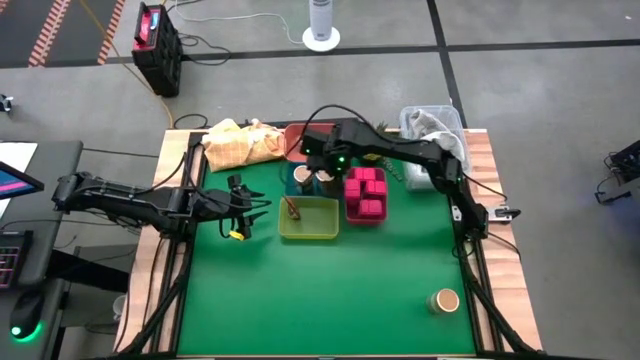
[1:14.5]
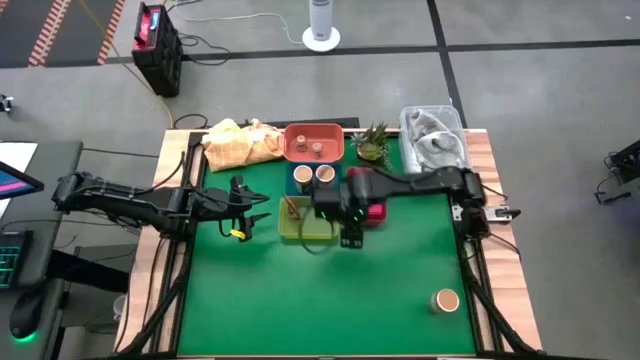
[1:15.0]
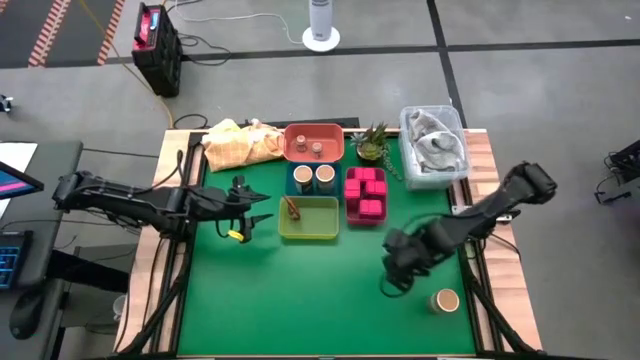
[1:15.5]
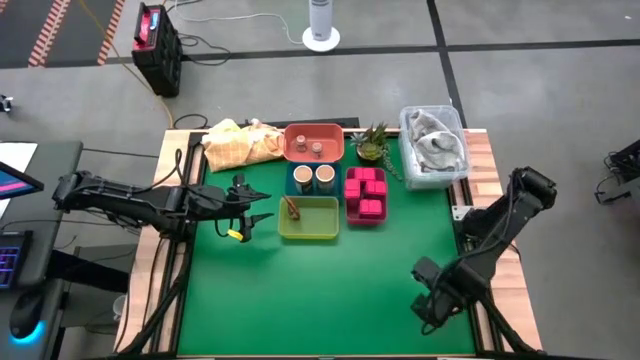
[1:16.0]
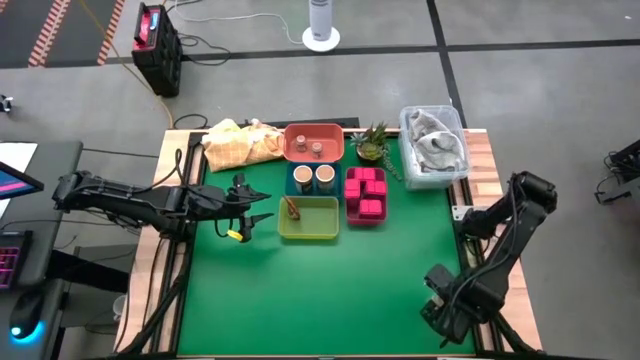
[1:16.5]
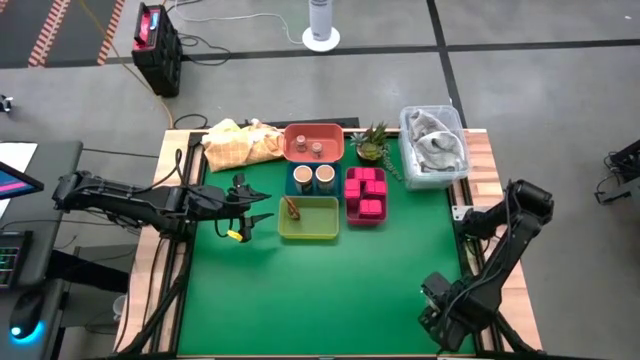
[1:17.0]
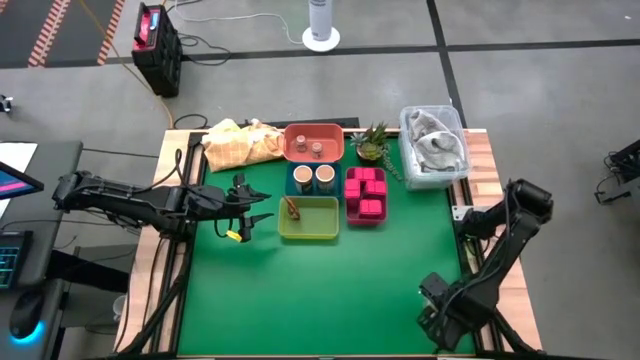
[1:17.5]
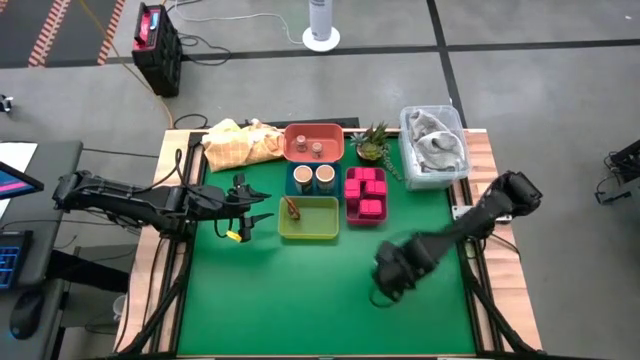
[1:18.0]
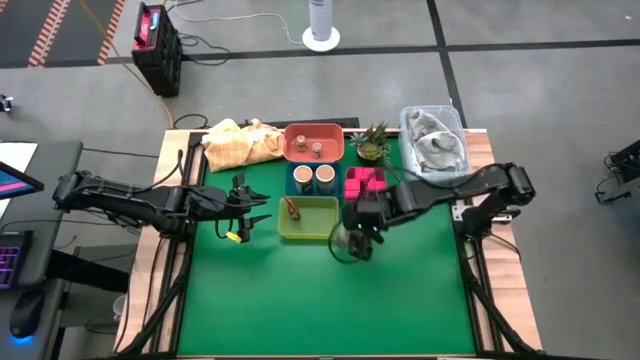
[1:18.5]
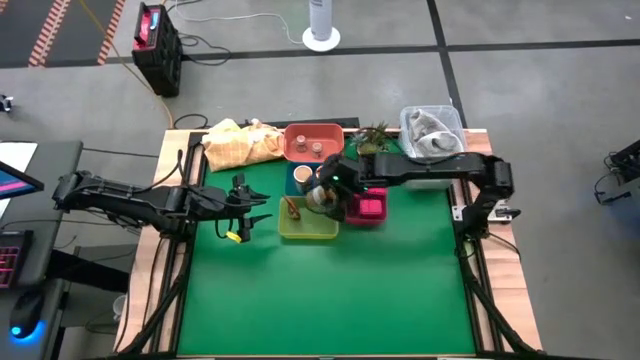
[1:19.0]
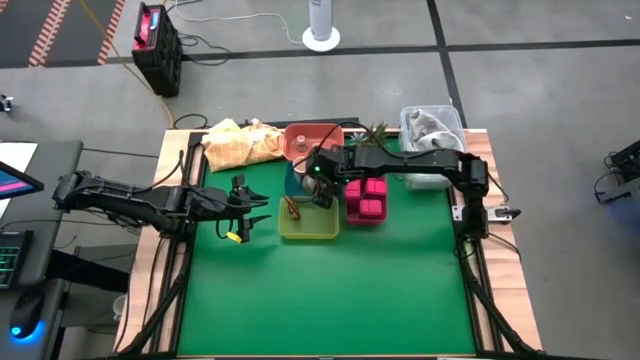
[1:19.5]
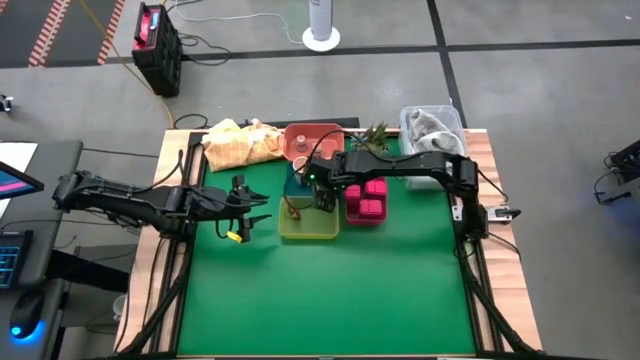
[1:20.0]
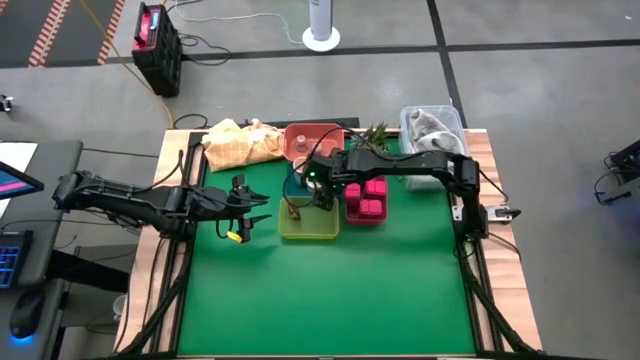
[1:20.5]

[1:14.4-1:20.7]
Task: Sort spices by type
Put the gold seasoning bottle into blue bin

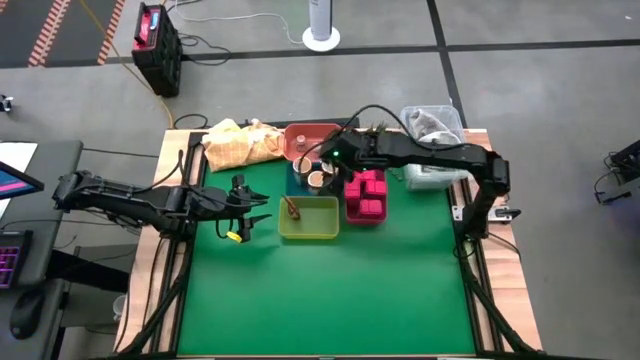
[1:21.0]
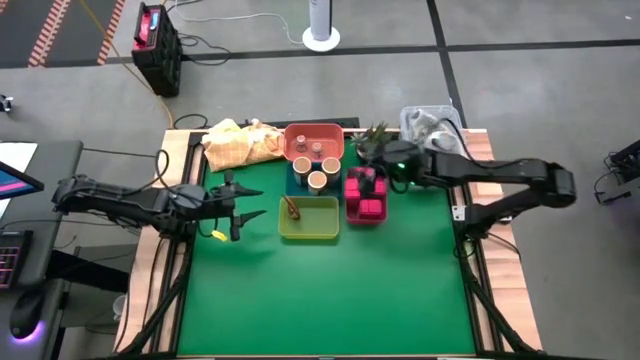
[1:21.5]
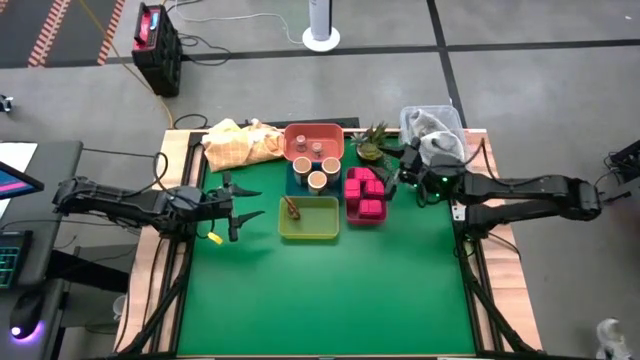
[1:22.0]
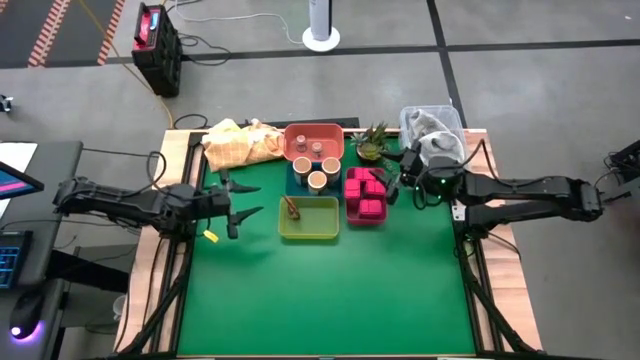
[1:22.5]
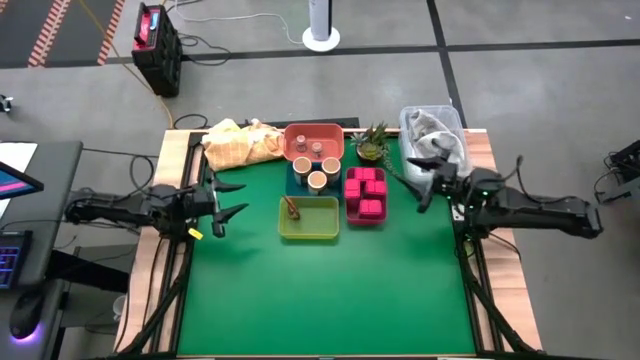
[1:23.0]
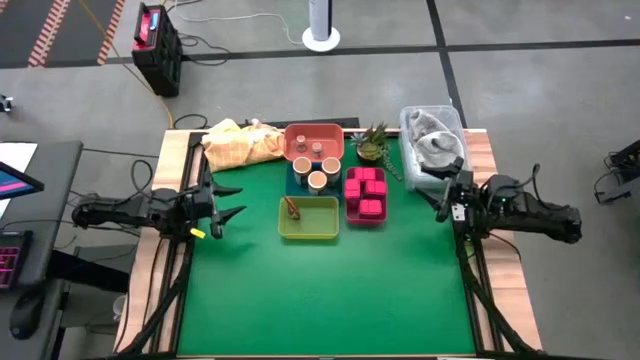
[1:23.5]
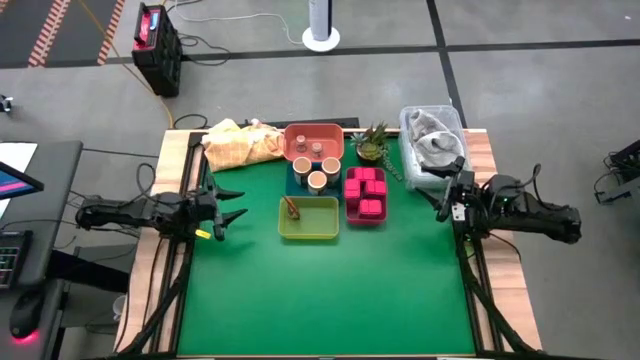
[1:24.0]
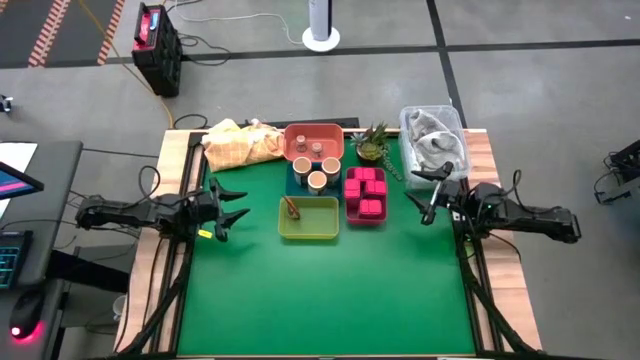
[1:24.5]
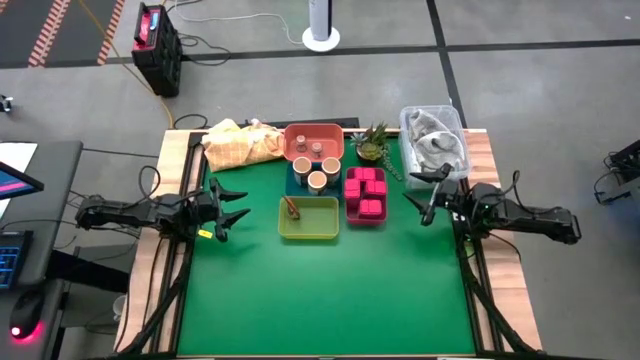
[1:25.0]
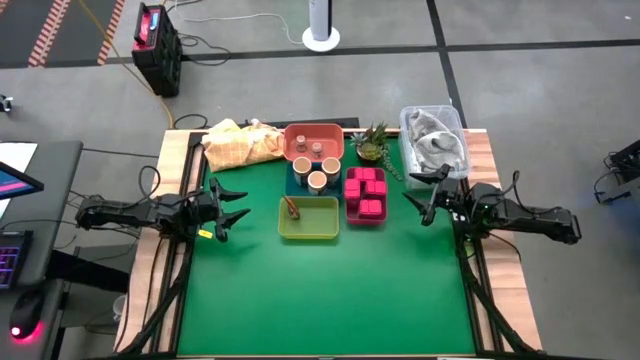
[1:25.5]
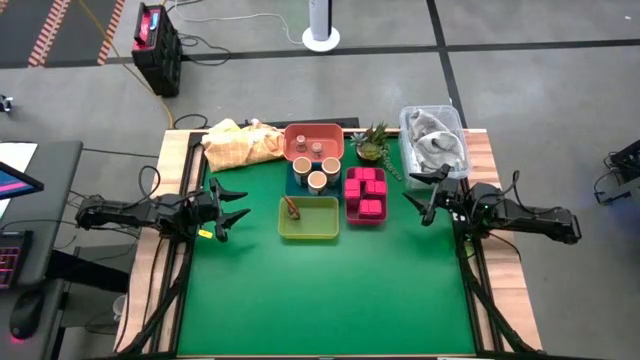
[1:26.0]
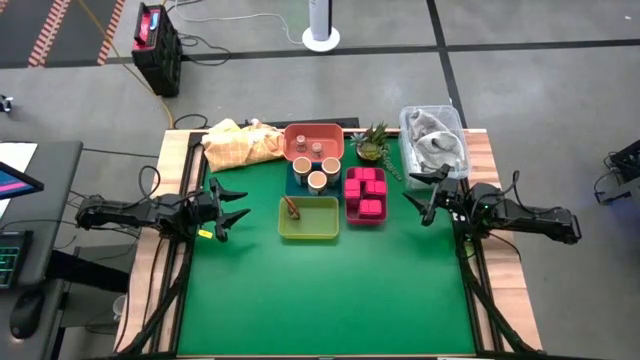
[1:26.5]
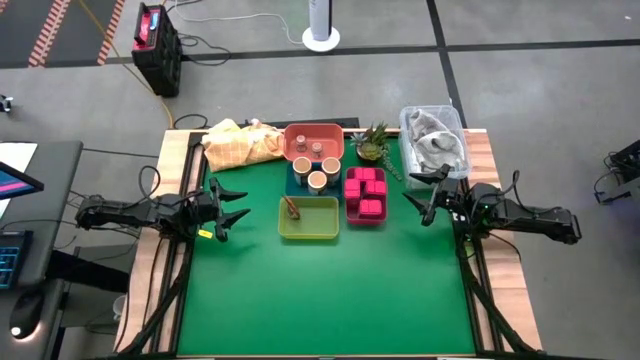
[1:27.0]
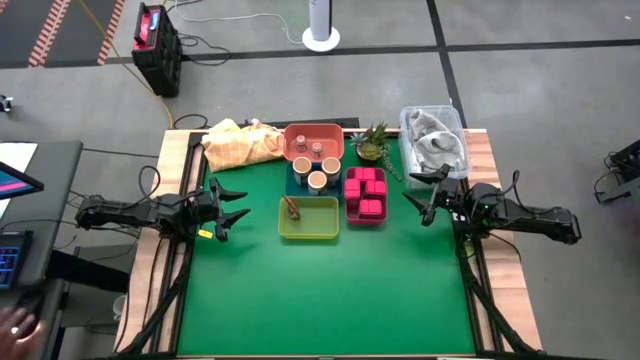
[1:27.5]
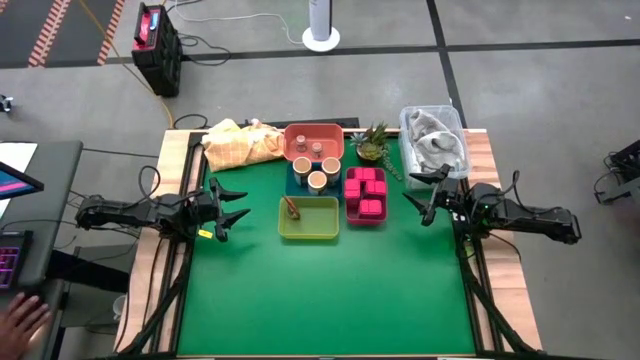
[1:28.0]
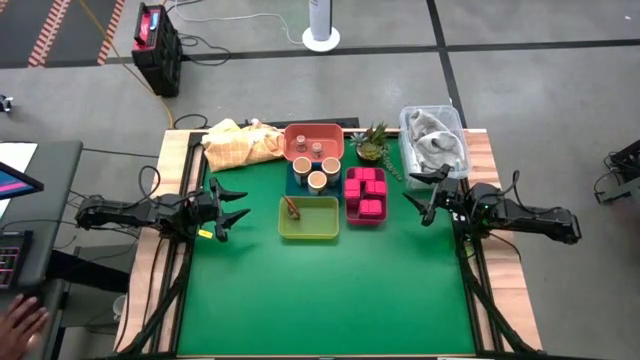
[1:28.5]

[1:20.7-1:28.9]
Return to Home Position

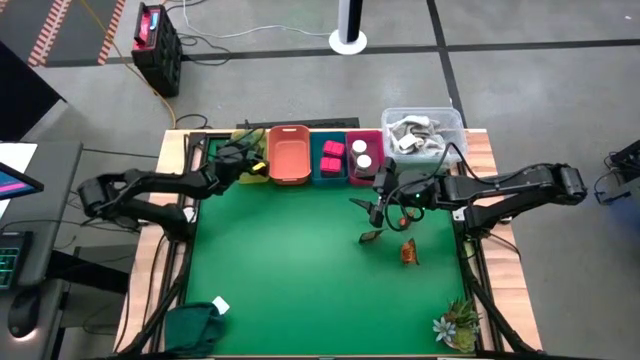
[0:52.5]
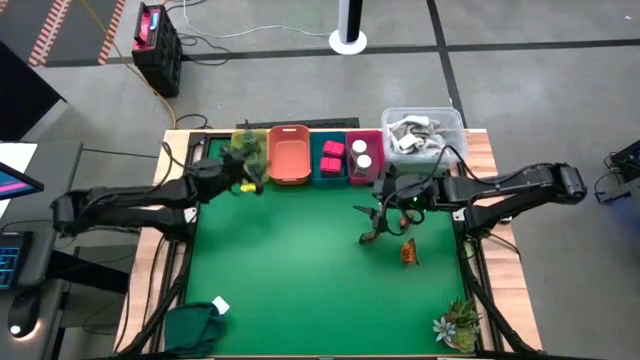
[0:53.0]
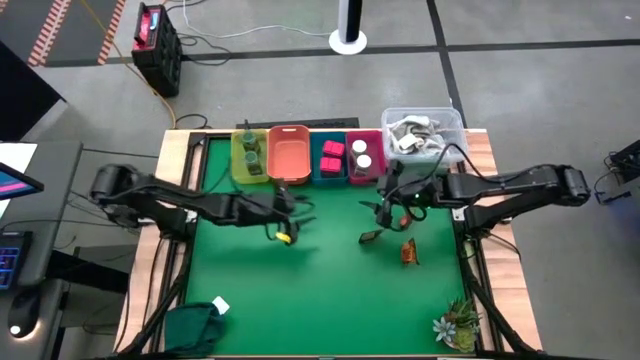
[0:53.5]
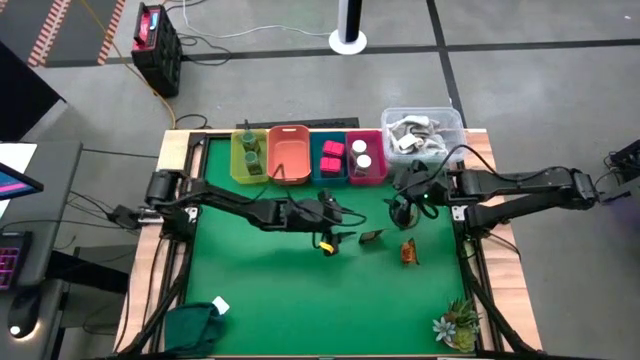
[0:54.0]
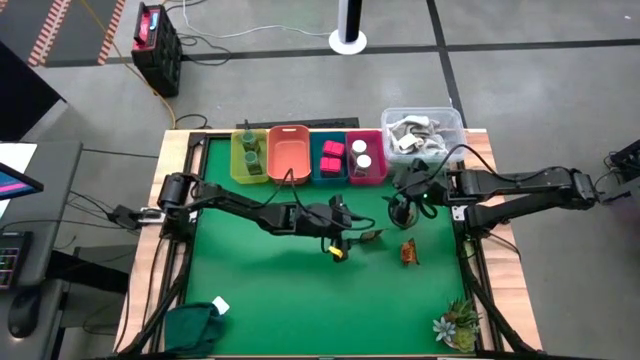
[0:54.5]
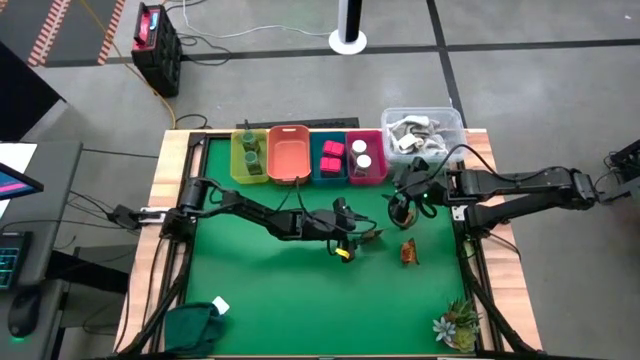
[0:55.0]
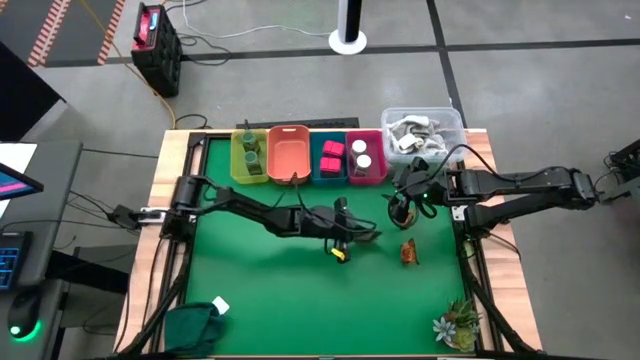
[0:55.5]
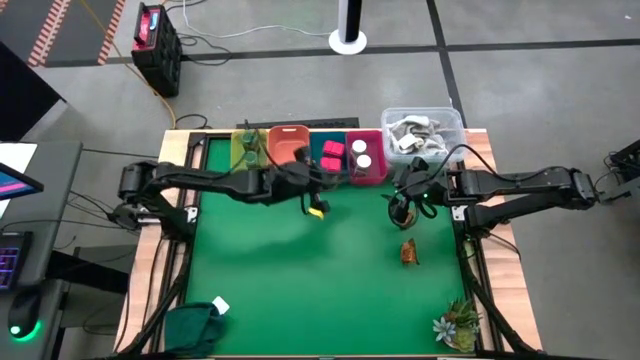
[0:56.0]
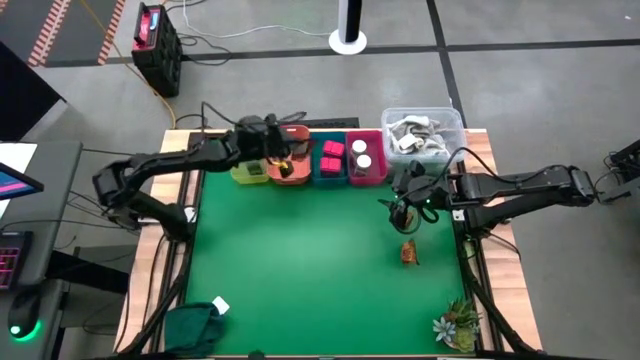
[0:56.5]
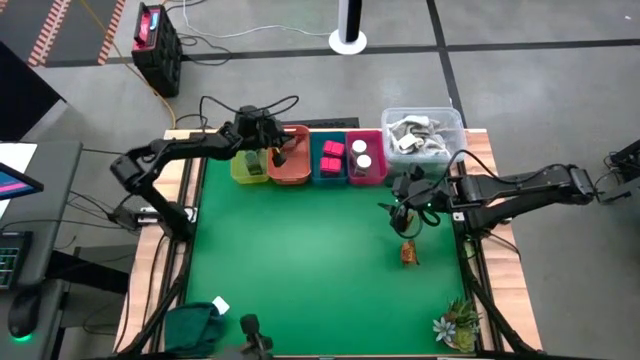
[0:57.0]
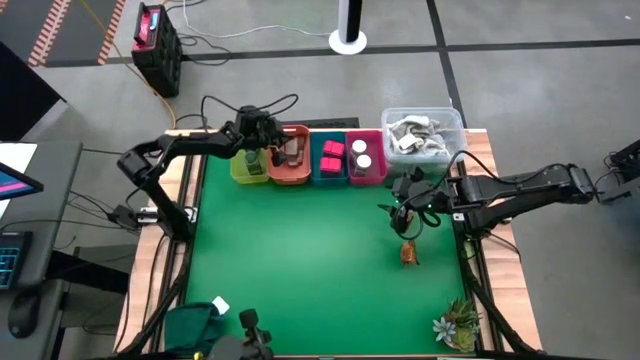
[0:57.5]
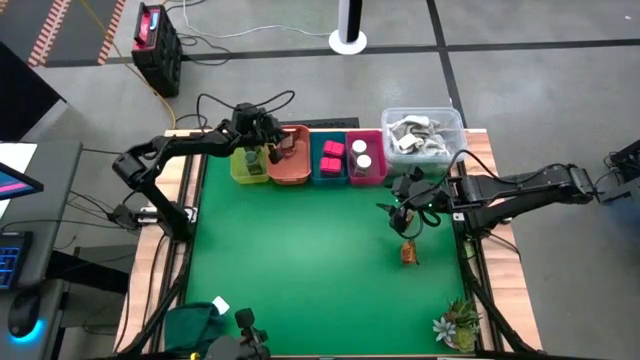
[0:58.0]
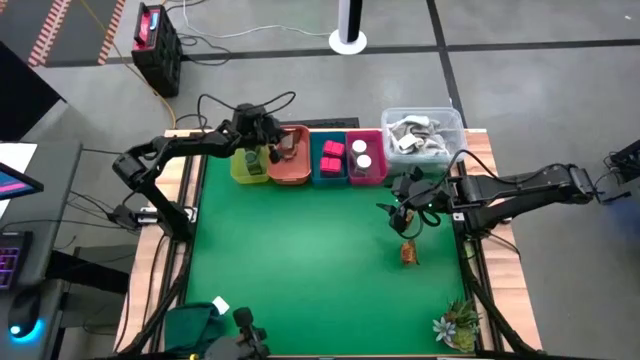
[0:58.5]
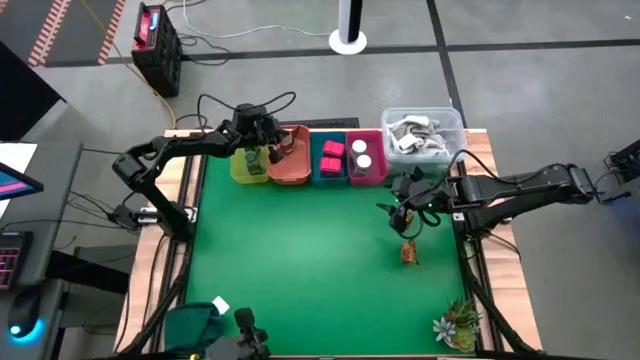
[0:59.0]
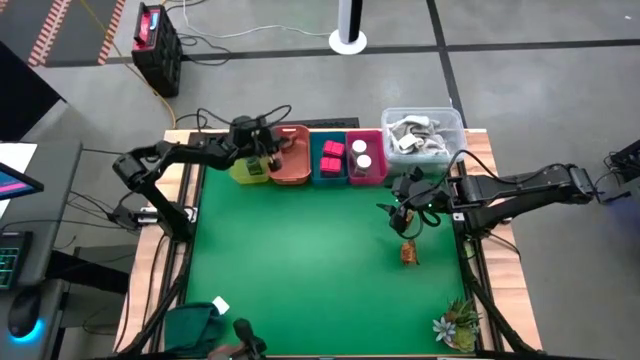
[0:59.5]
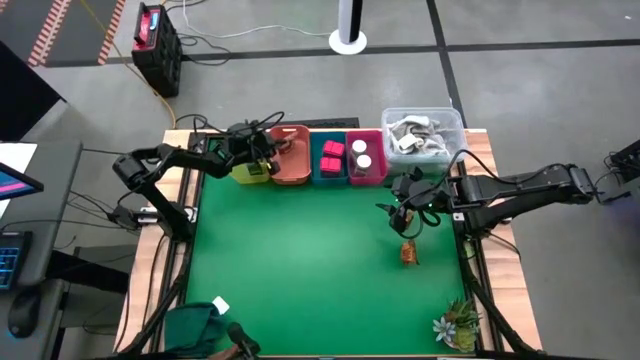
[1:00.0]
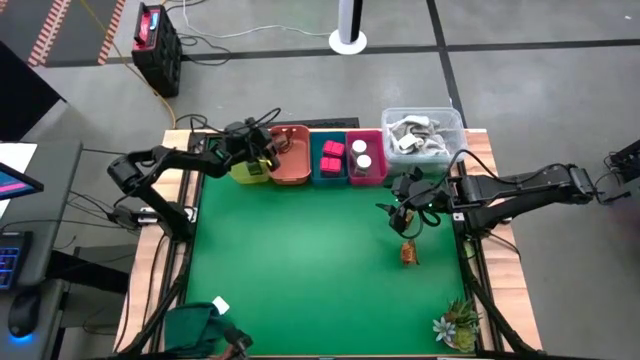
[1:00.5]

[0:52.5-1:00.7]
Task: Sort spices by type
Put the middle left orange seasoning bag into the orange bin
